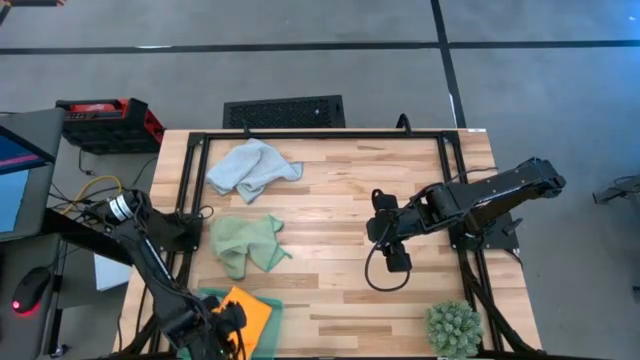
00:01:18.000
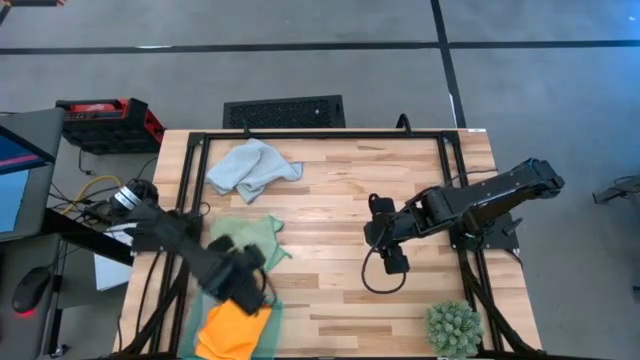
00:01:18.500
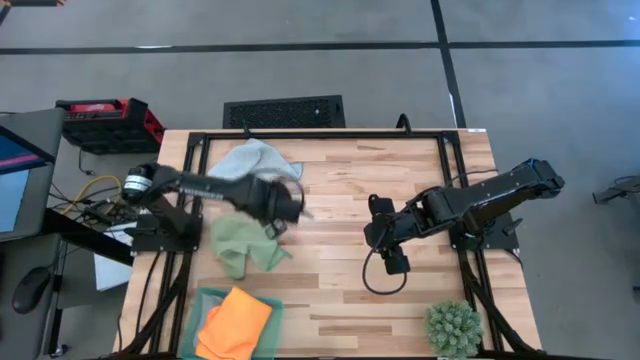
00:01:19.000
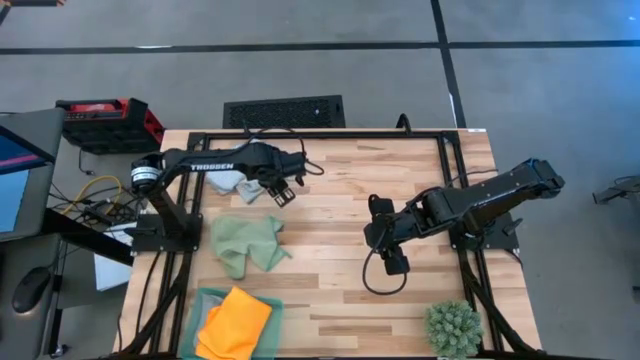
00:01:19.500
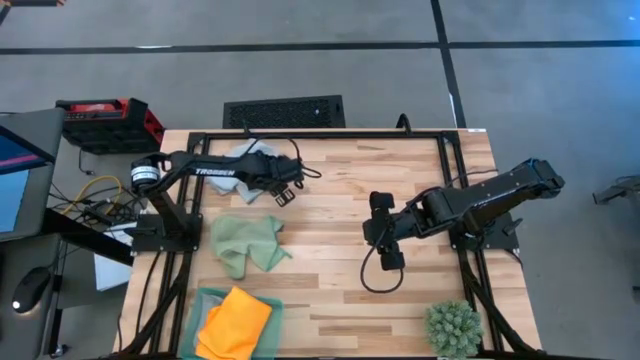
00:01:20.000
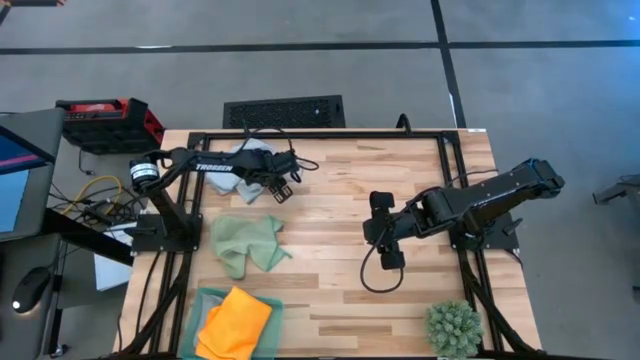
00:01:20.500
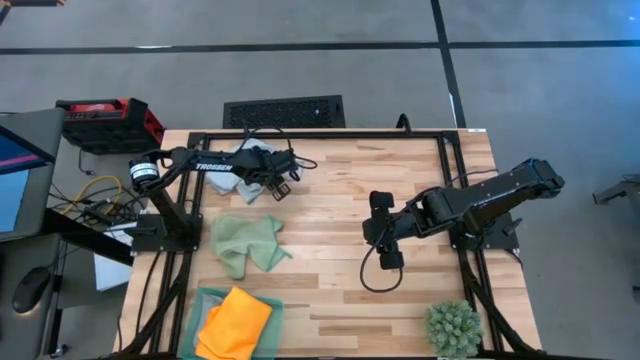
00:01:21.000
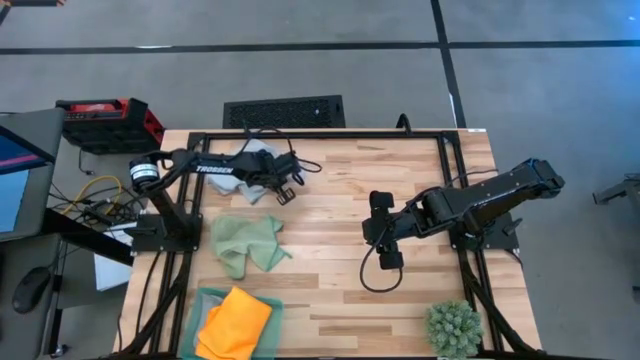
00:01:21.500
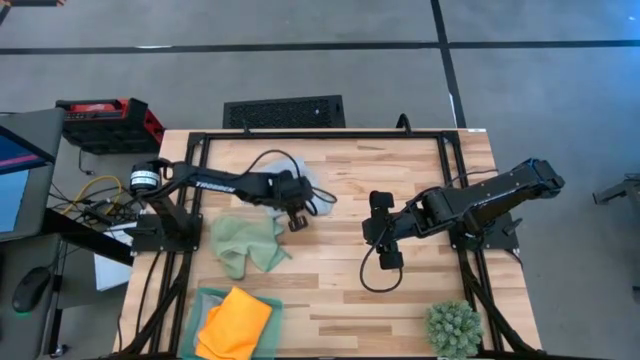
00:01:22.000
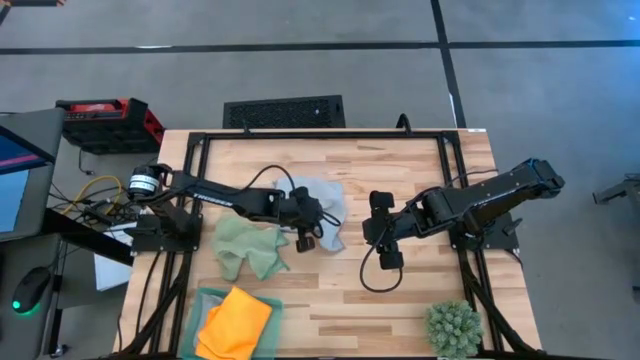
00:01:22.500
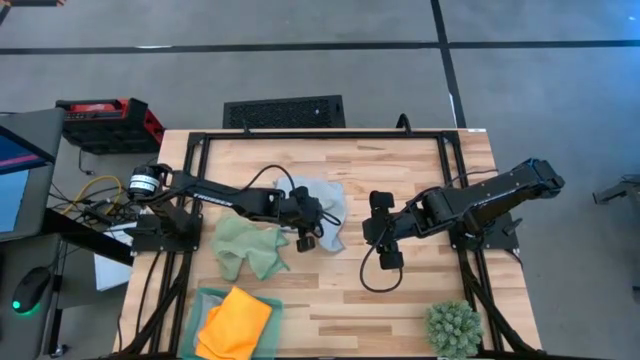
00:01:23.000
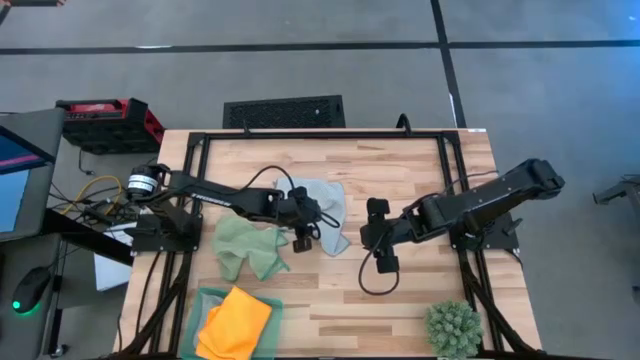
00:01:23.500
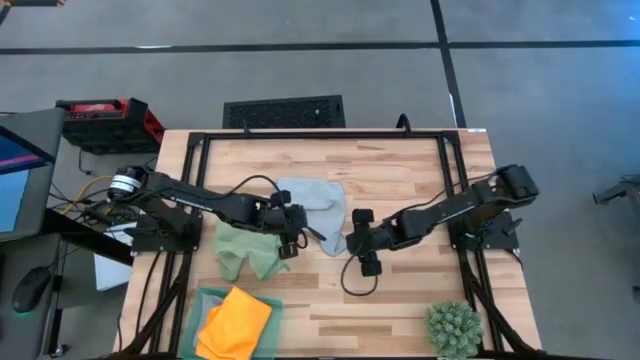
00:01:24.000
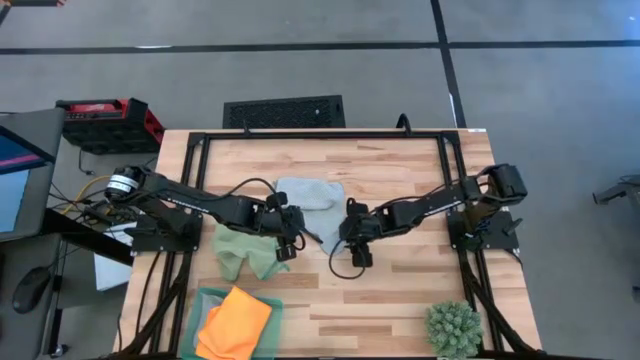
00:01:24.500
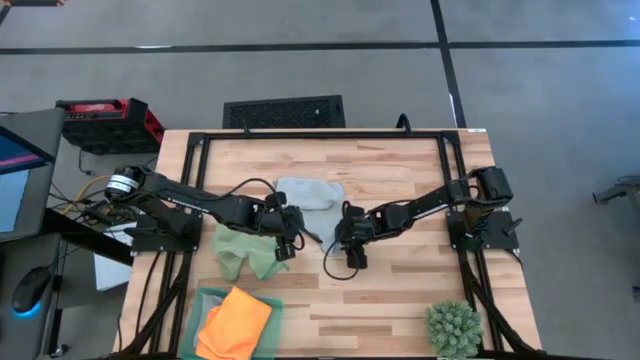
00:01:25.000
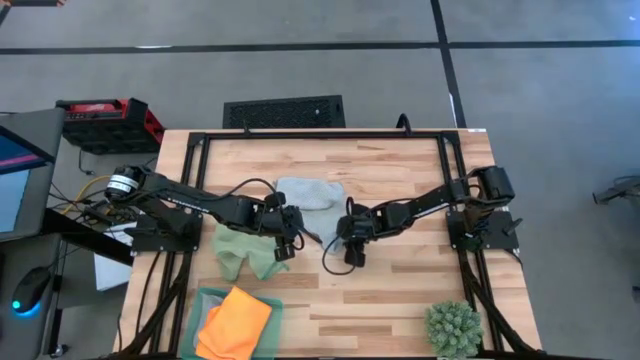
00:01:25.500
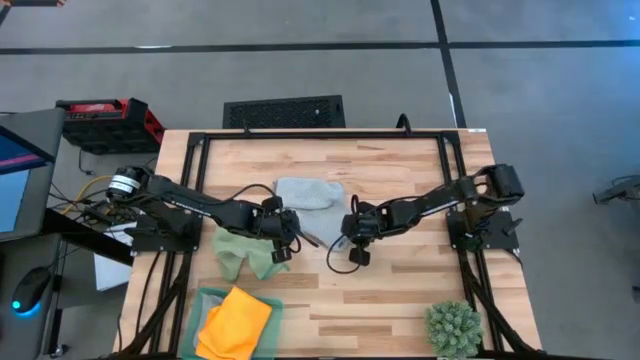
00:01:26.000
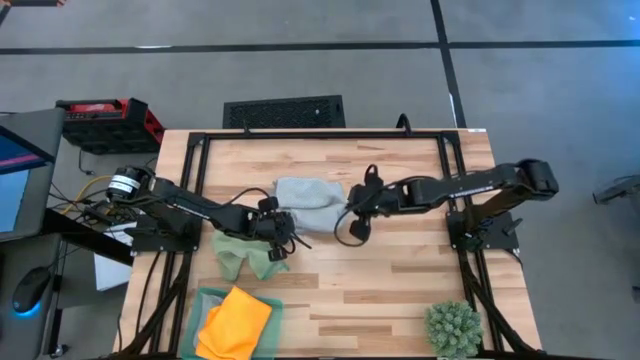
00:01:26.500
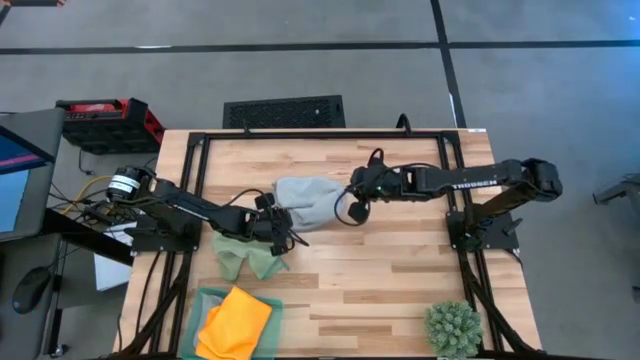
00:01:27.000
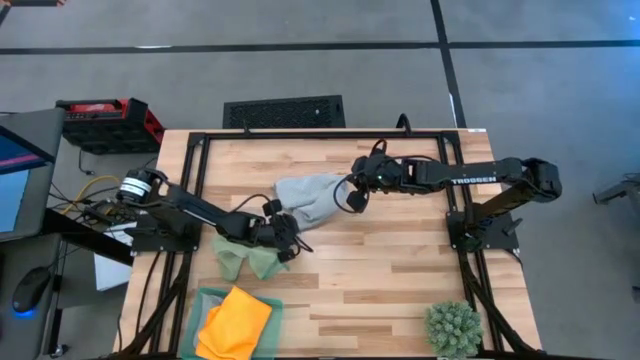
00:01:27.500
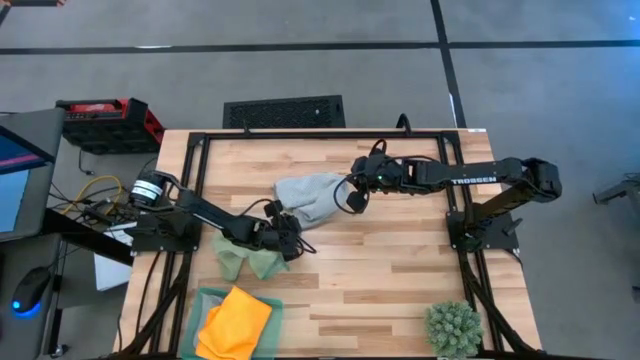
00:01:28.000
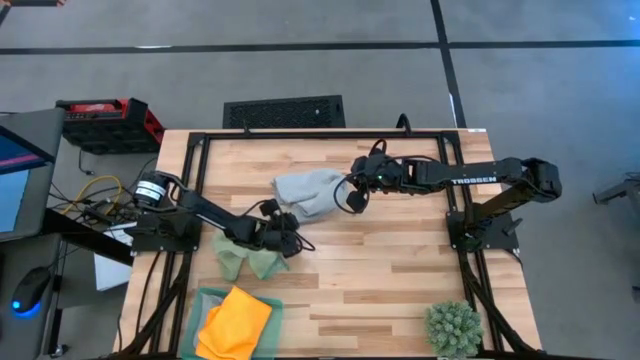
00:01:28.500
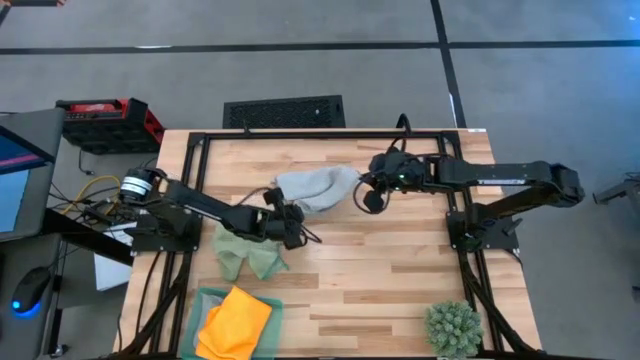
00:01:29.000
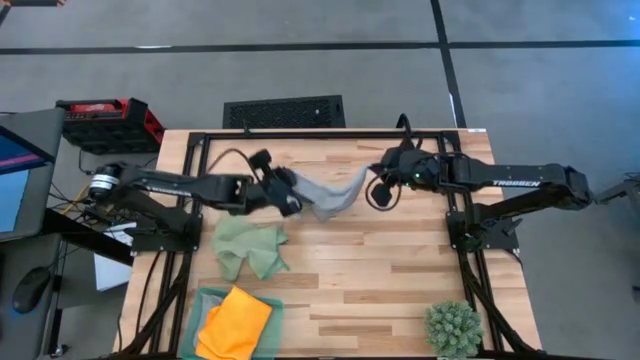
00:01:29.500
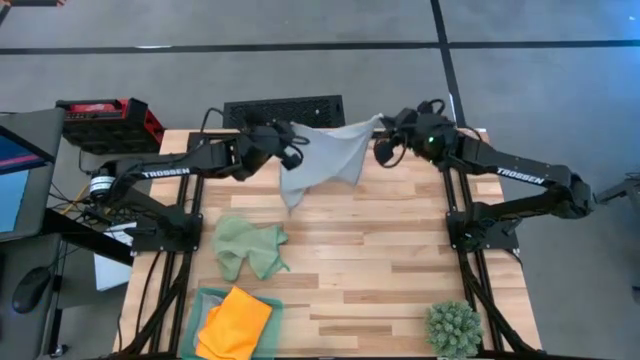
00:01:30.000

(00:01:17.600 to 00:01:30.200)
Task: Fold microfiber towels
Fold the gray microfiber cloth

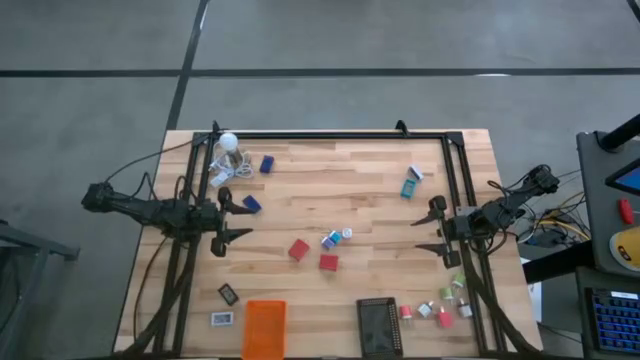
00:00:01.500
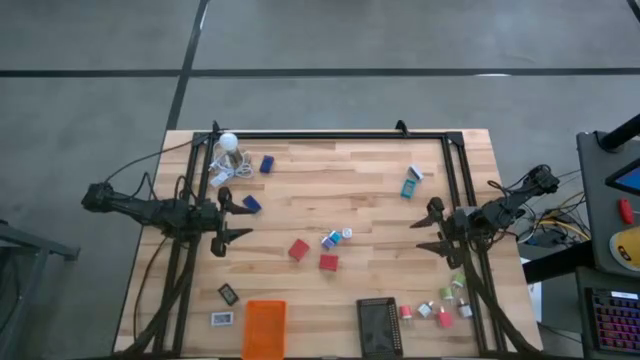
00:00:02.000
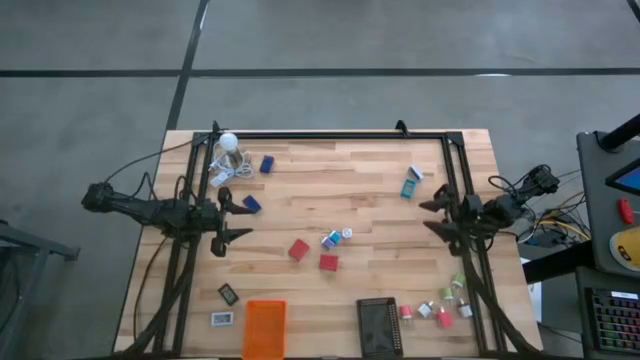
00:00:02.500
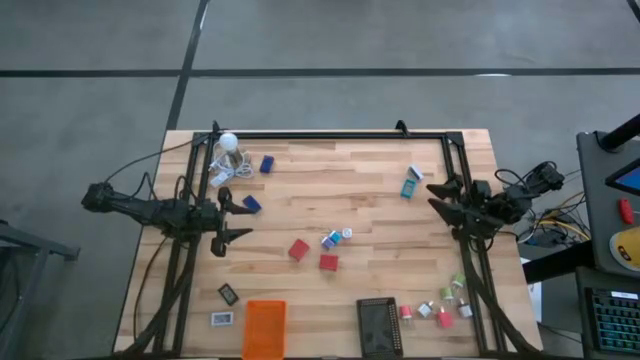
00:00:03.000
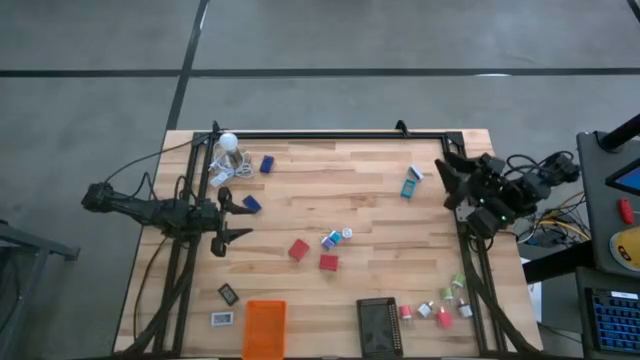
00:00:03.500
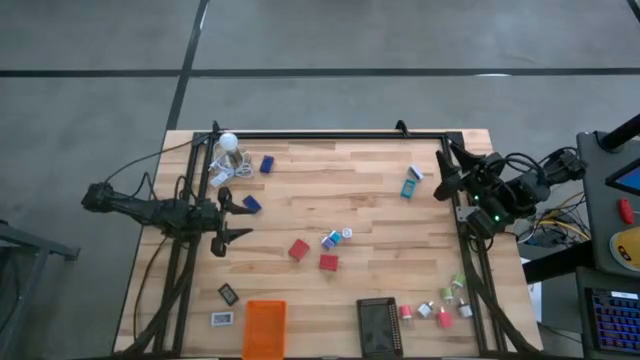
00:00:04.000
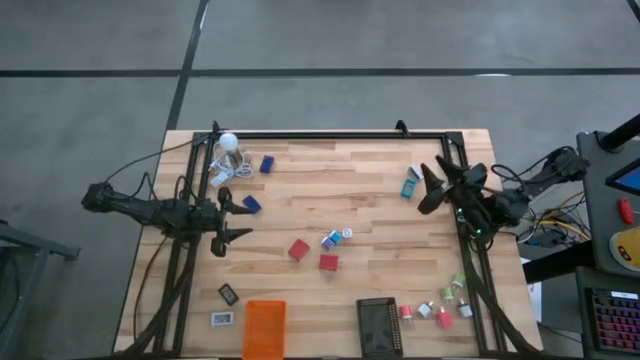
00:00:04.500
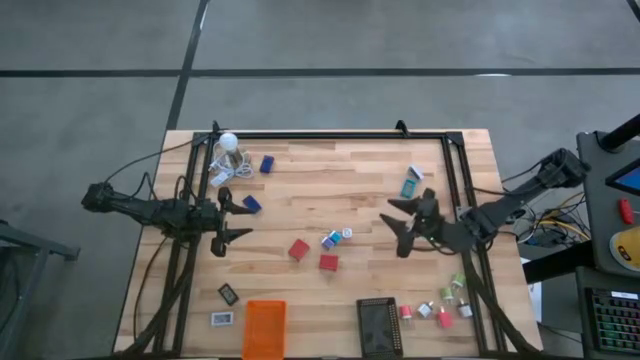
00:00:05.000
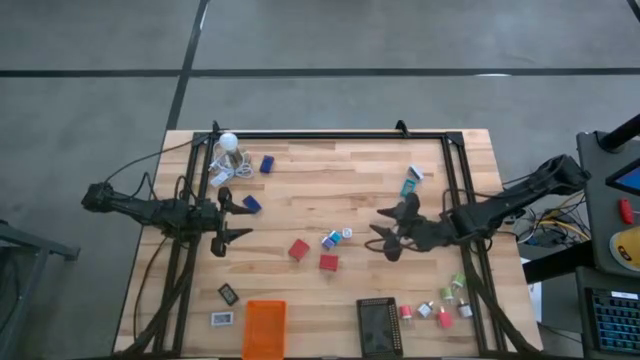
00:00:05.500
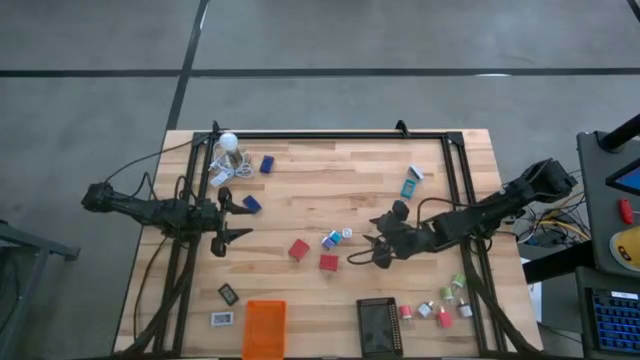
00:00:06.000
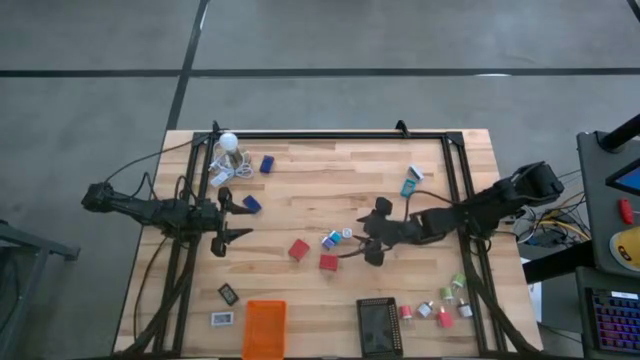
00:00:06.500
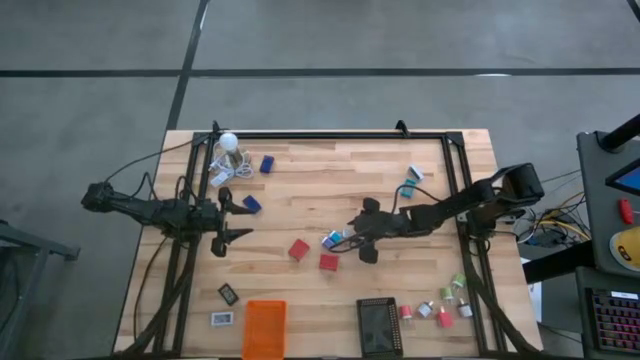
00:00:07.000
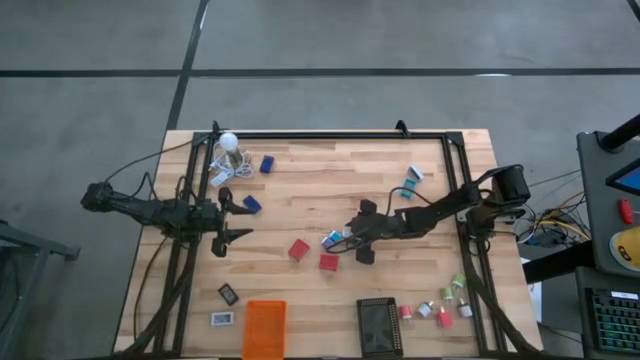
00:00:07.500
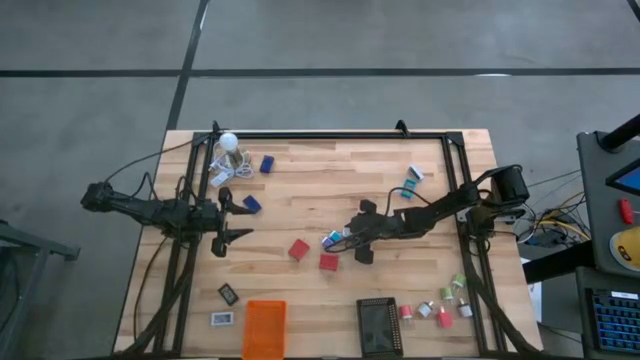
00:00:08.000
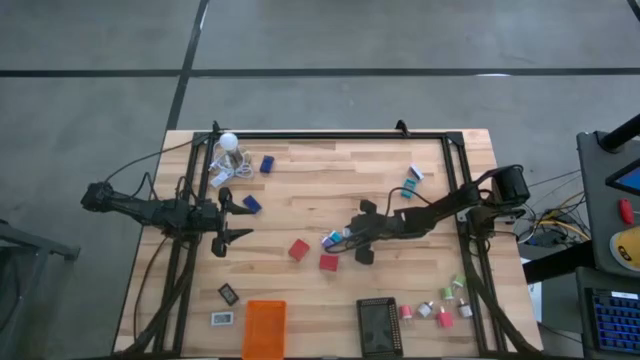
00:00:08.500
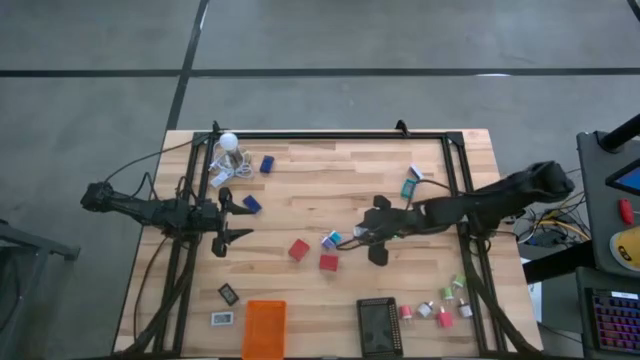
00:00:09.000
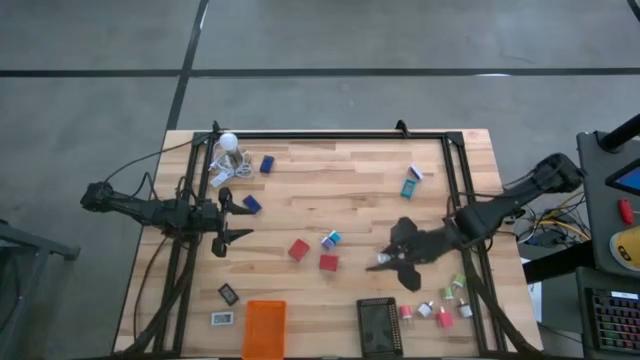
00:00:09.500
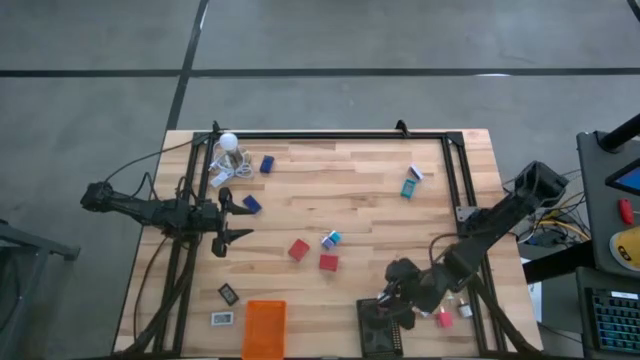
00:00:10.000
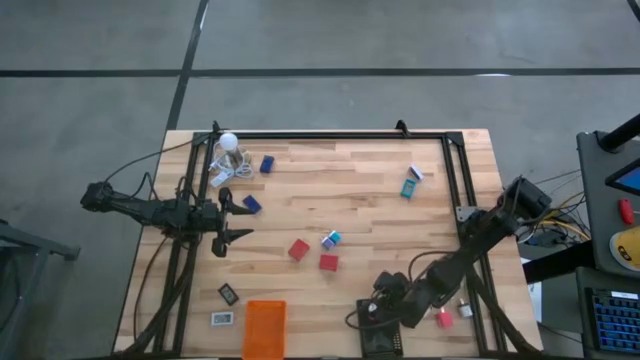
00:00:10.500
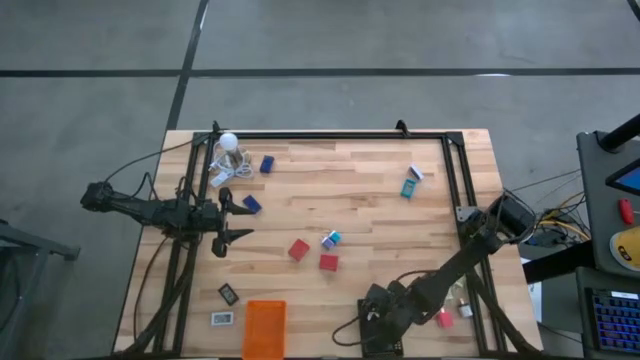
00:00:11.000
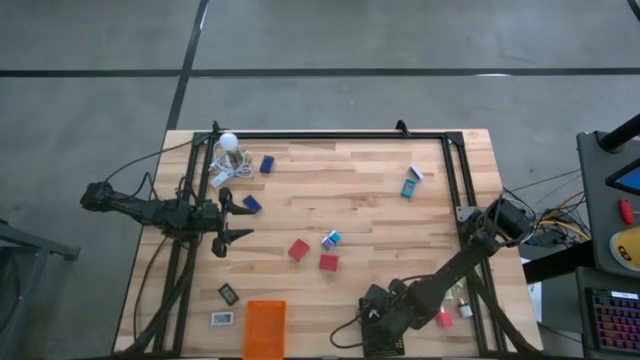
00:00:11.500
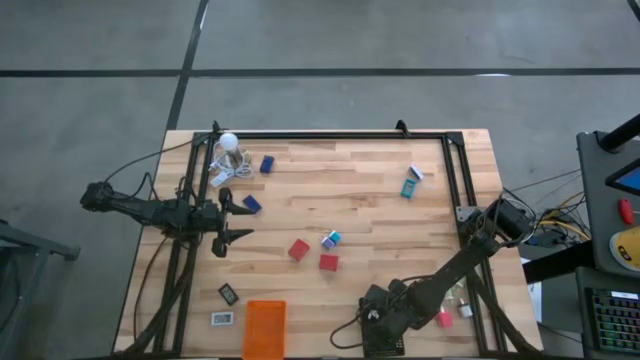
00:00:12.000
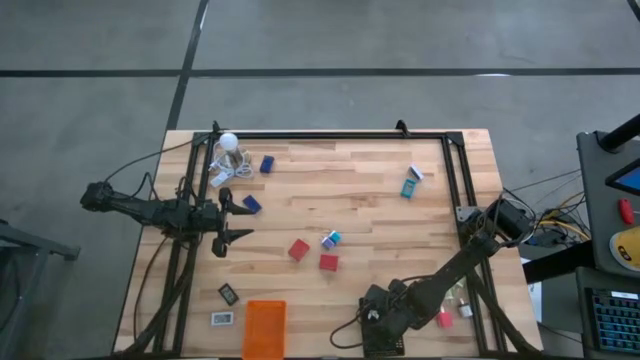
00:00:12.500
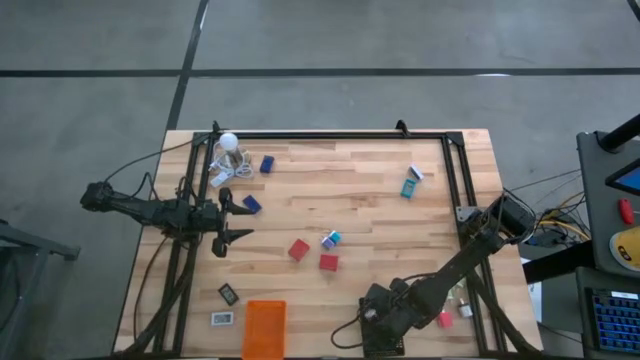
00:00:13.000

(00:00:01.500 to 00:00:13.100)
Task: Pick & Place Office items
Put the top pink white charger adapter in the black bin
